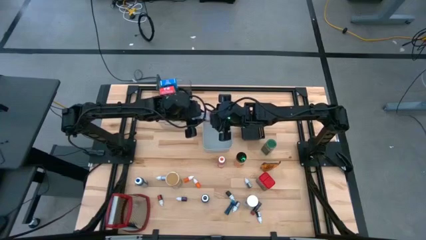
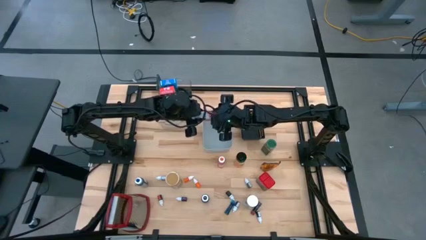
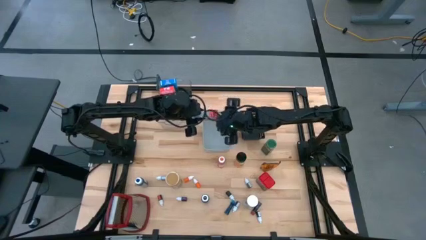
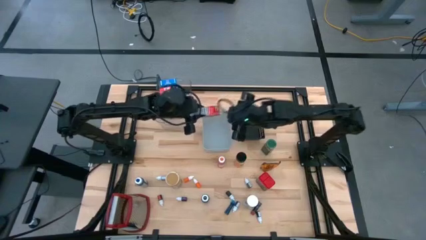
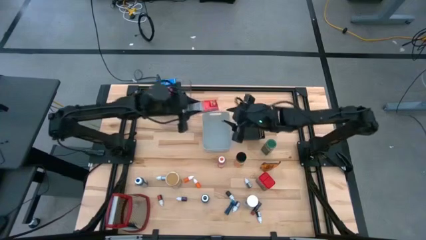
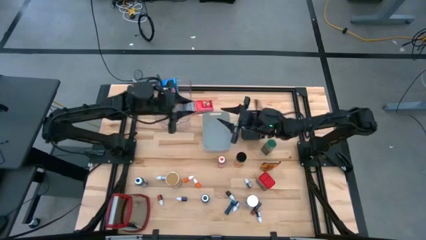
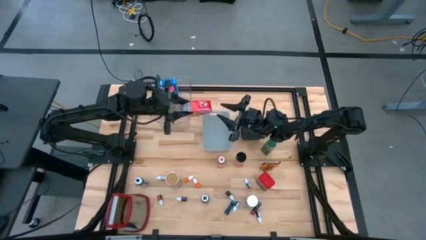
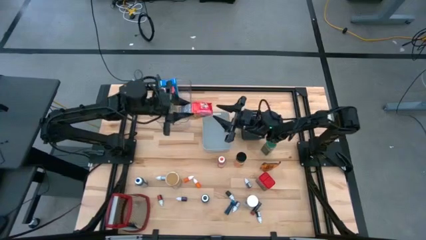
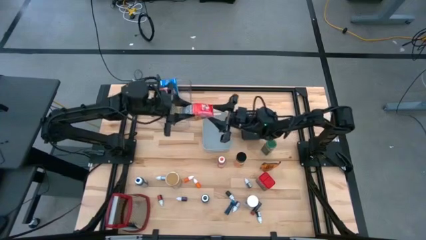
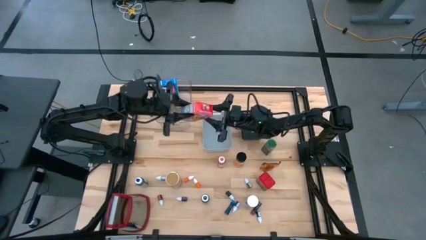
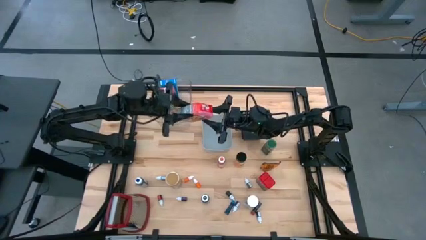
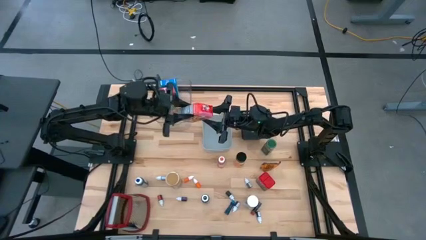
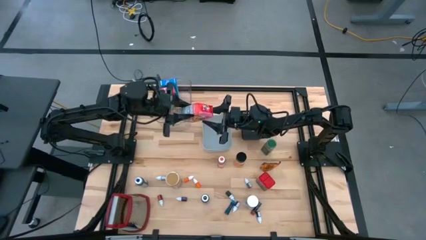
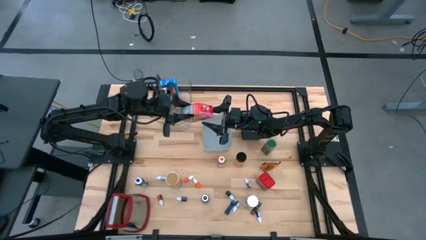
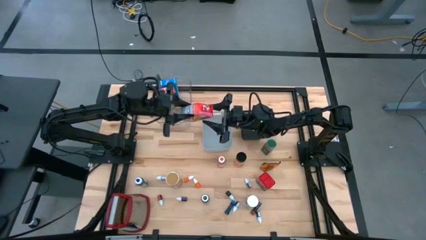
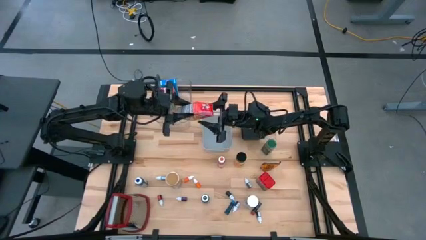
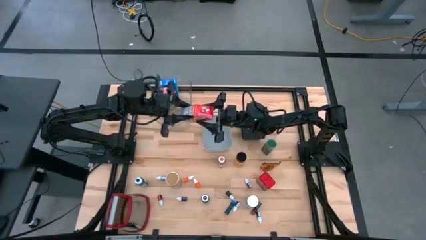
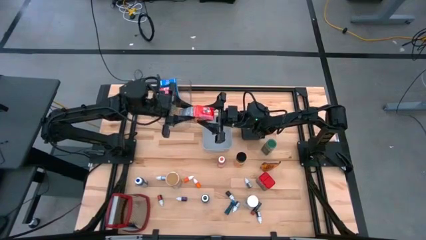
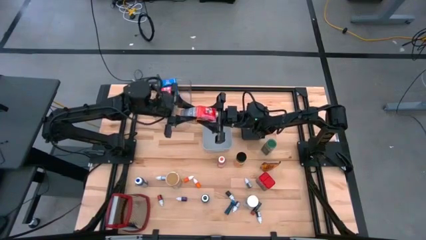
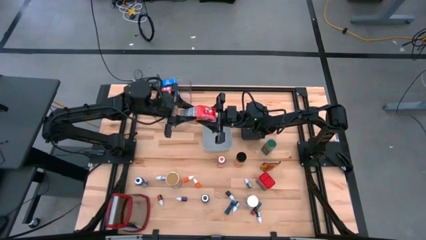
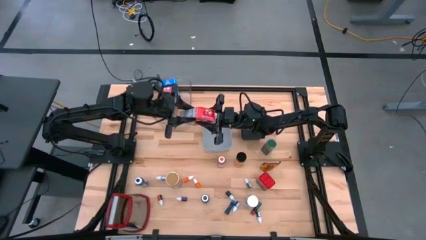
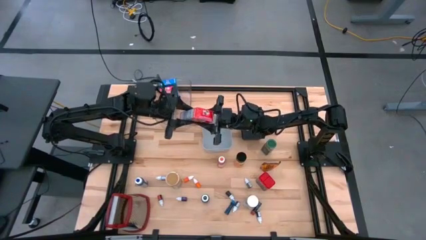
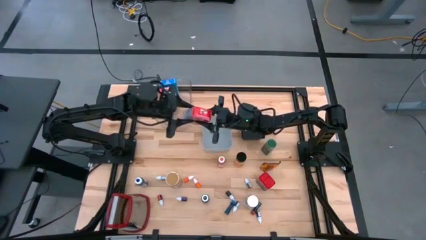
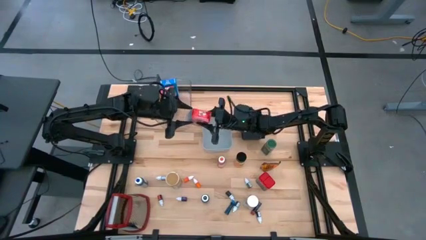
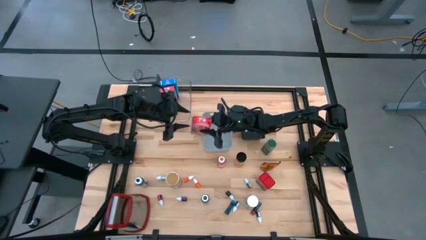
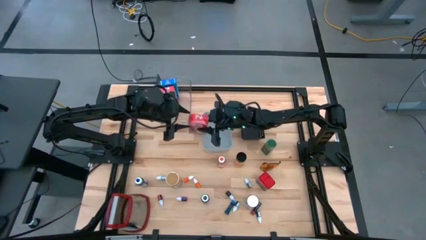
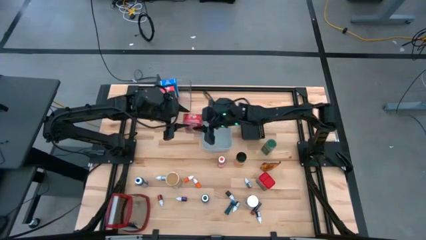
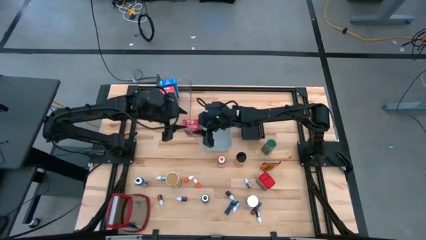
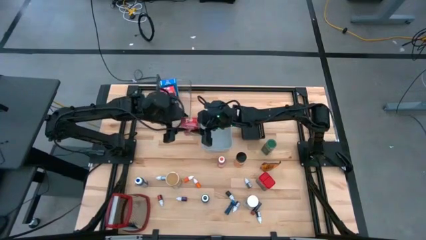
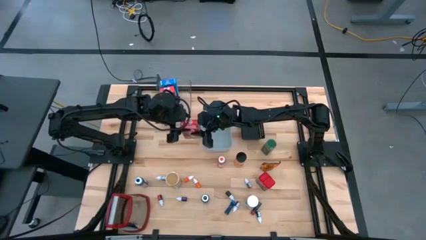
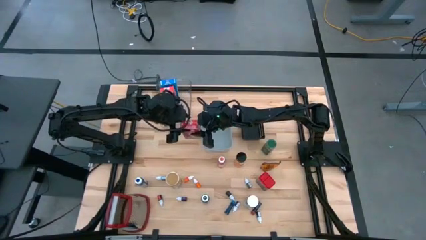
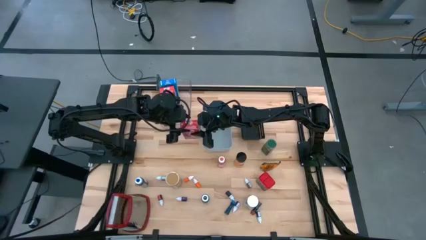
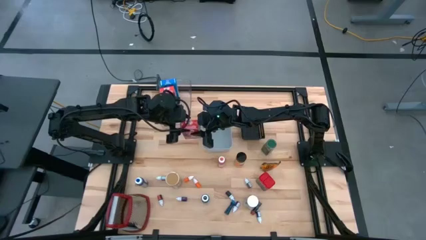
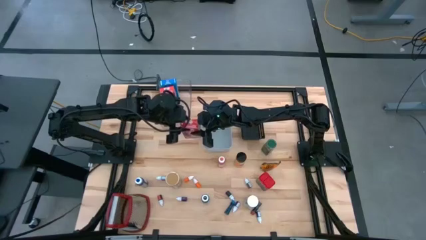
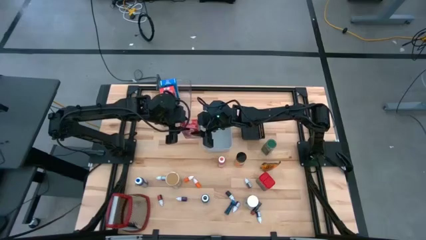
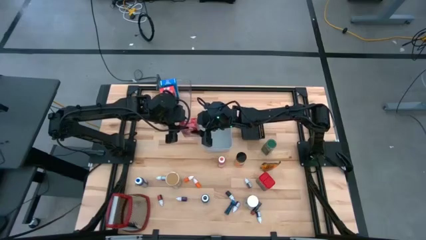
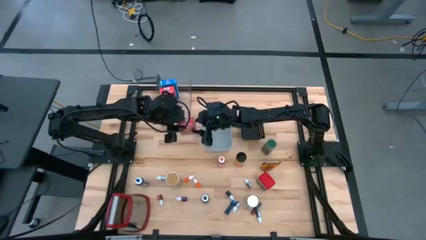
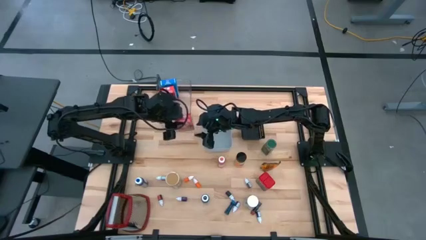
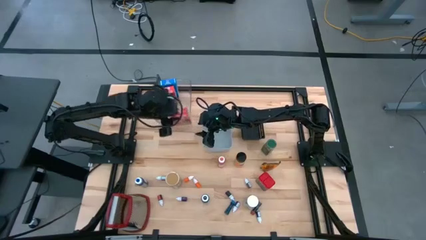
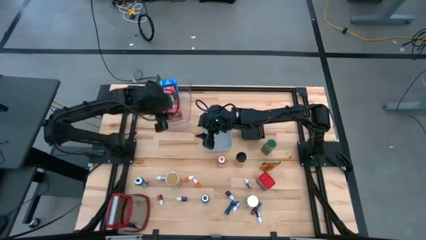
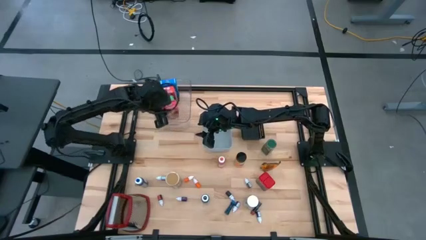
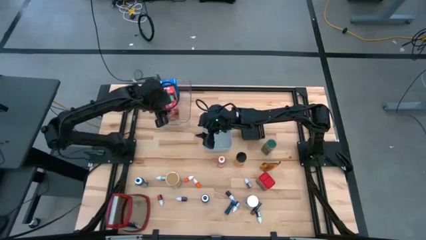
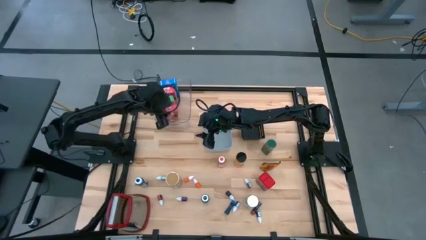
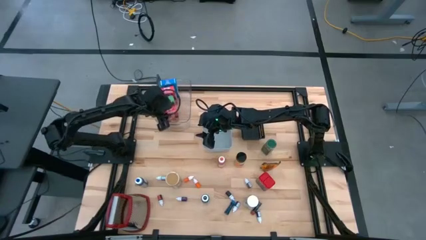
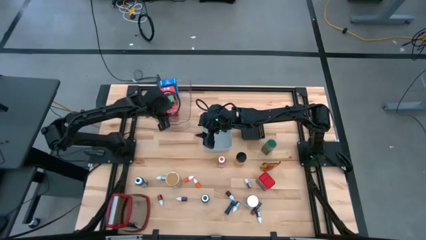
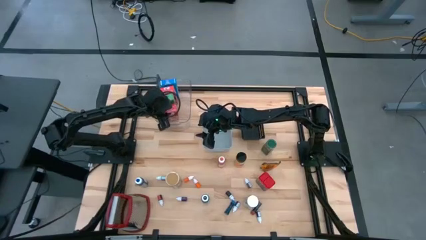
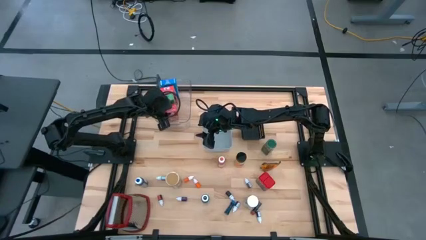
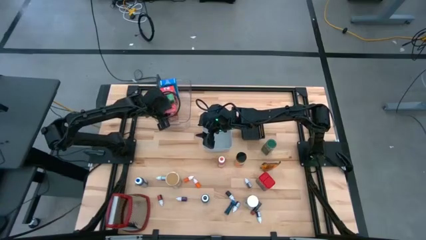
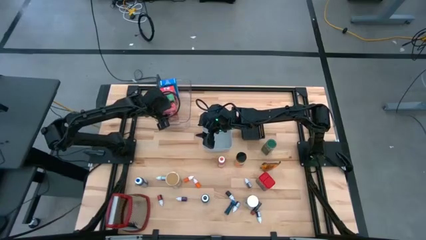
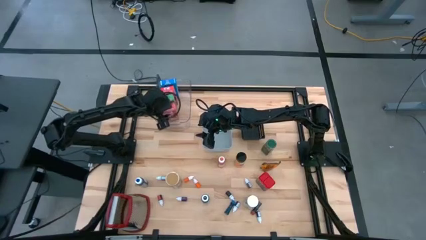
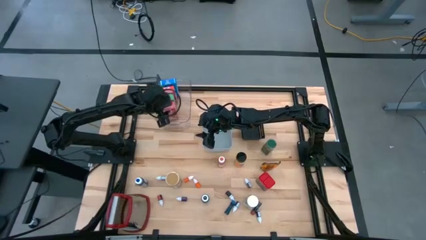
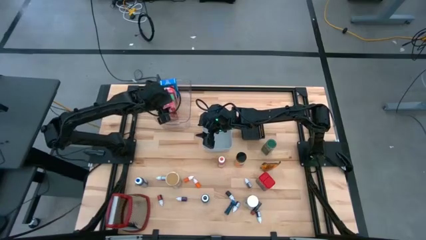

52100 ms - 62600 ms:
Task: Pick & Place Kitchen Items
Put the right red cereal box into the transparent bin

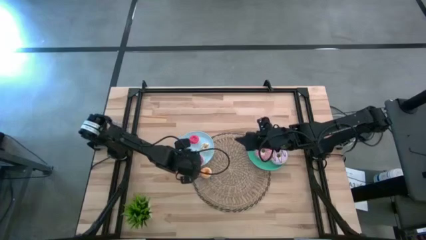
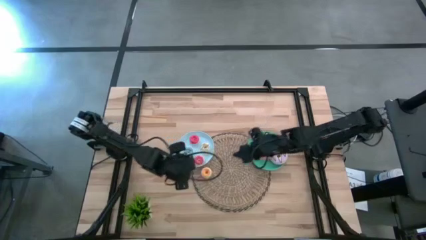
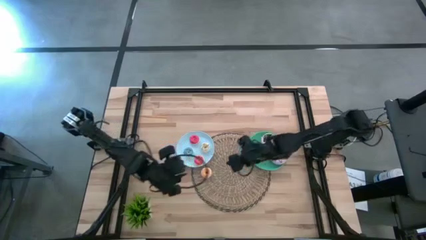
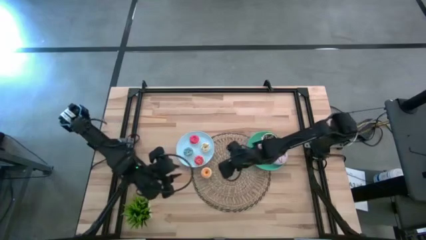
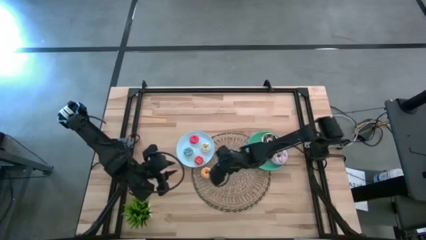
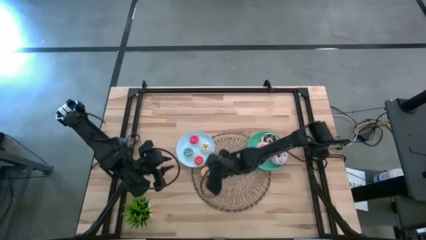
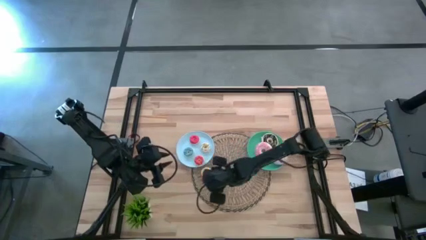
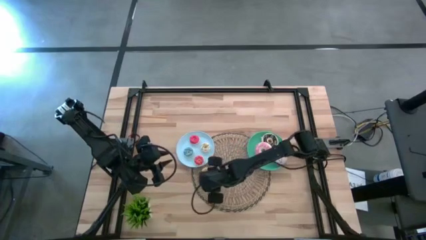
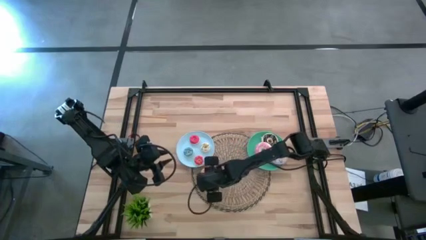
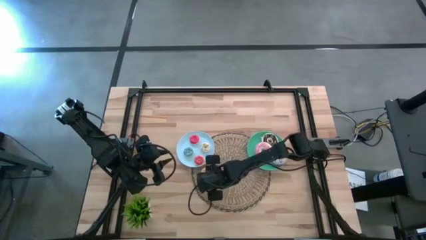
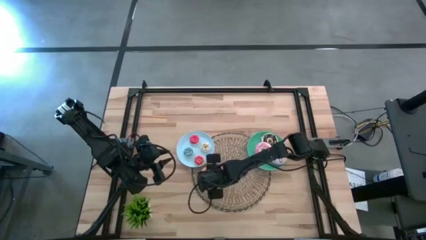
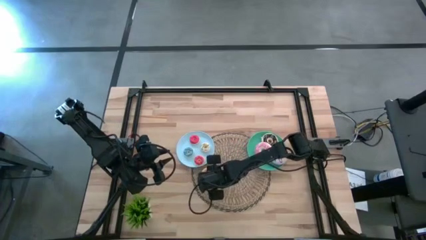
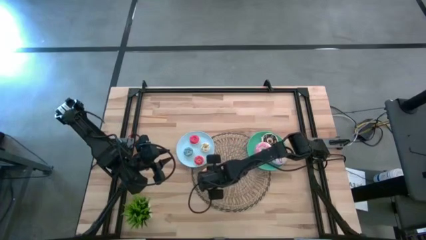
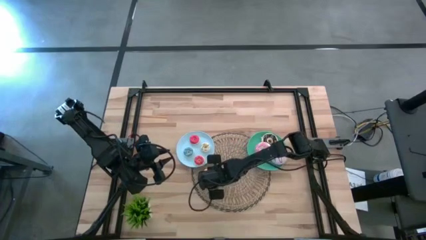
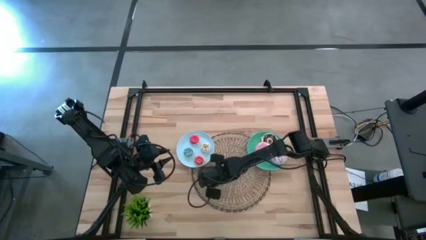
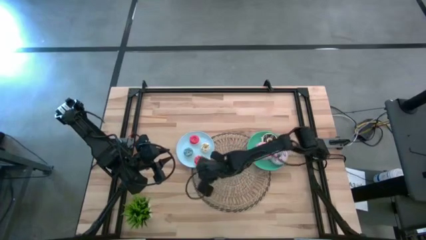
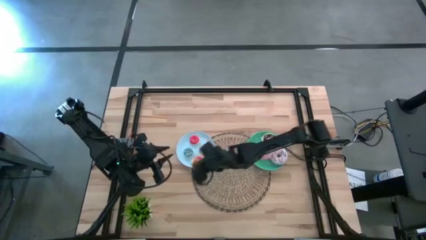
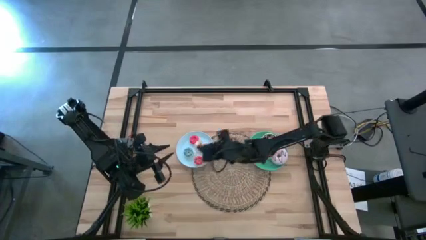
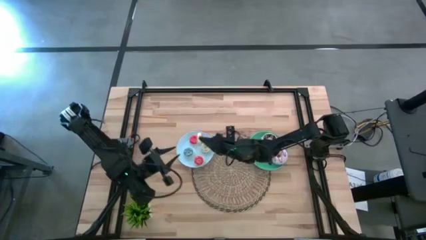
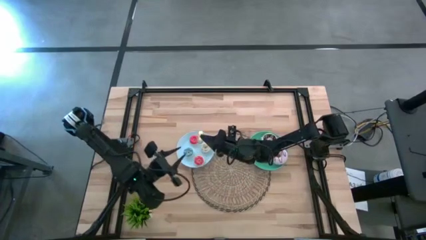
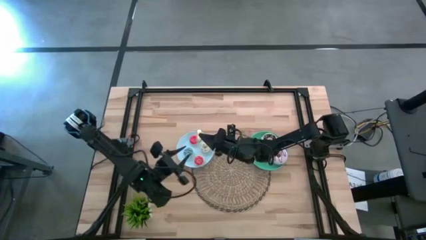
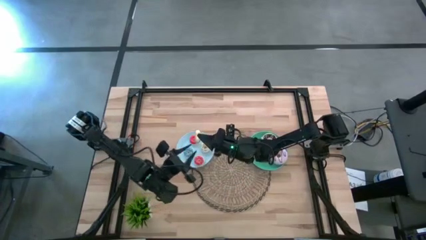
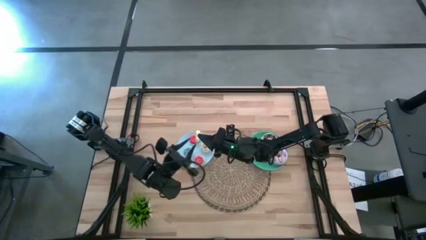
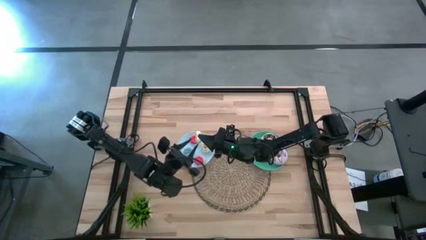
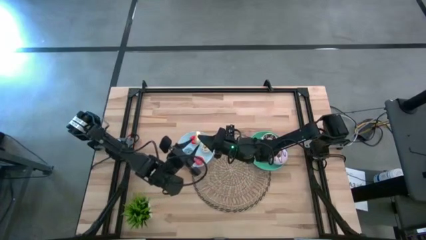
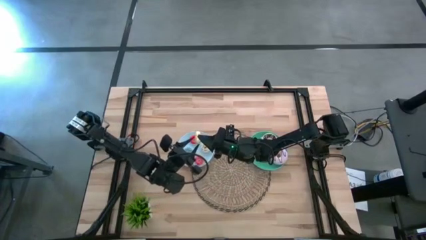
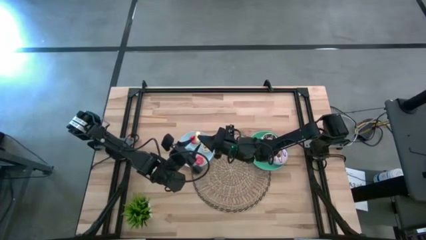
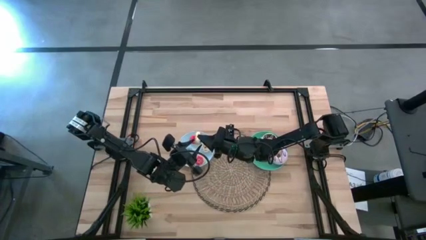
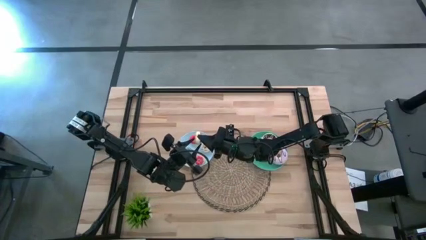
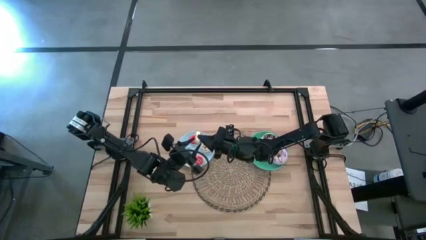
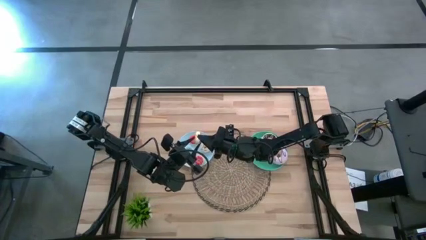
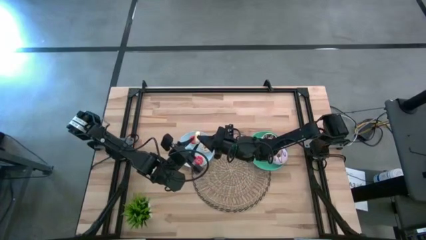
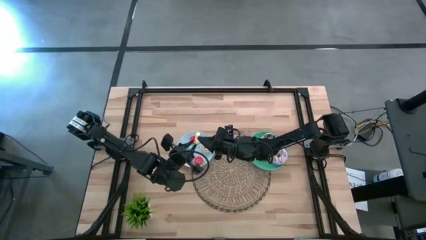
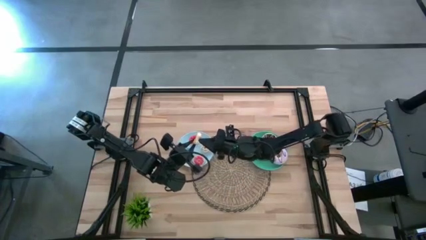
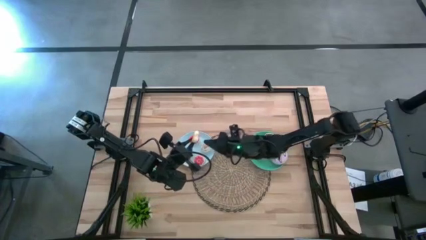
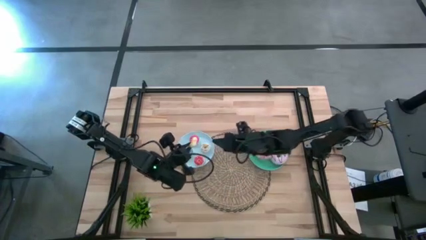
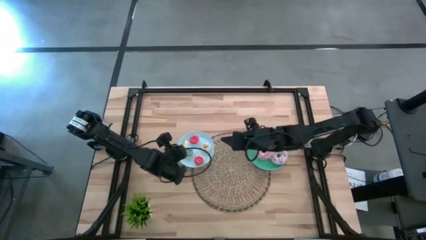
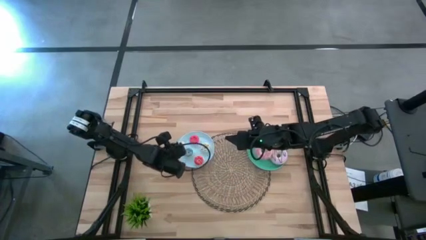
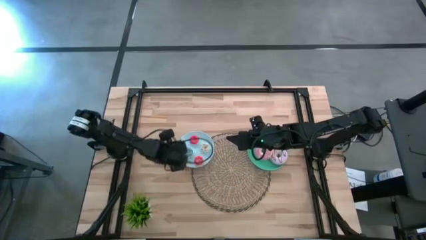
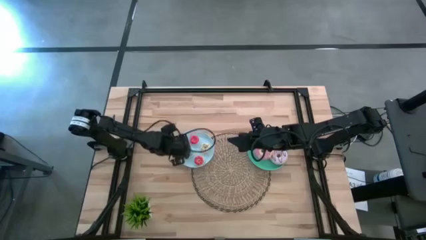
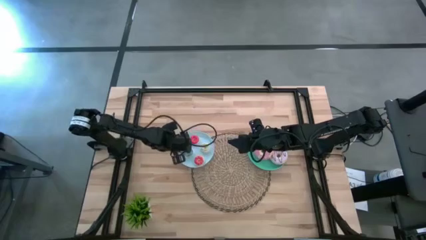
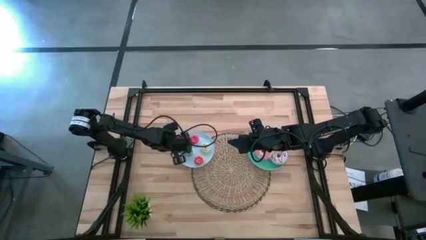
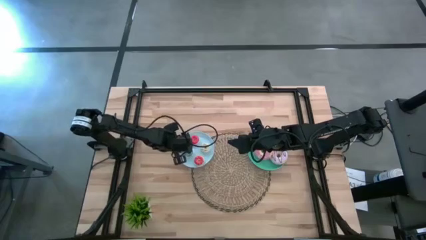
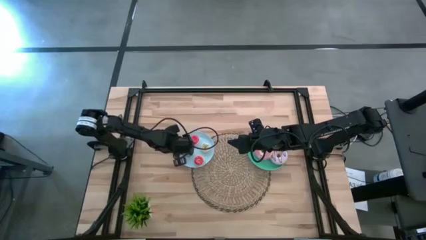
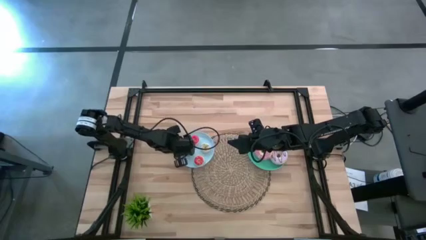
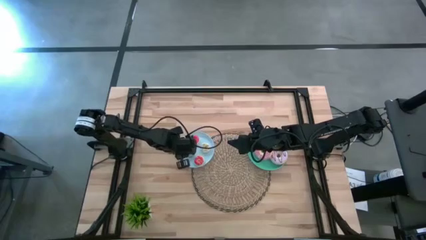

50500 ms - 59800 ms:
Task: Pick & Place donuts
Put the small yellow donut on the blue plate
